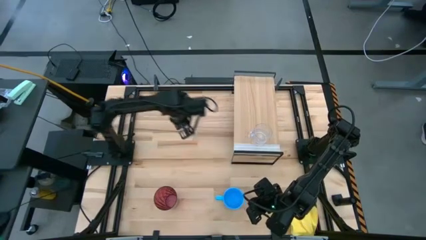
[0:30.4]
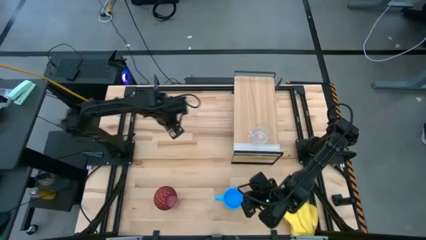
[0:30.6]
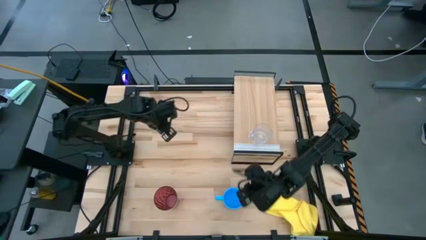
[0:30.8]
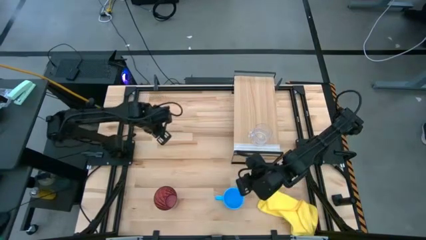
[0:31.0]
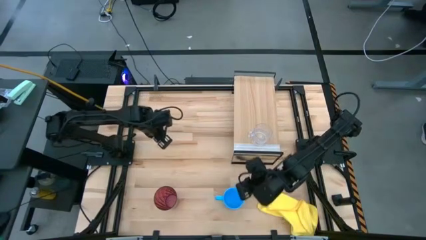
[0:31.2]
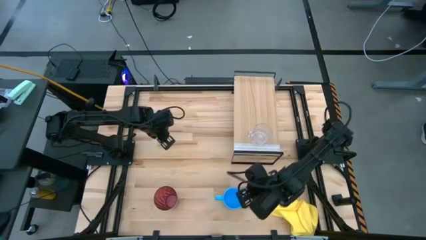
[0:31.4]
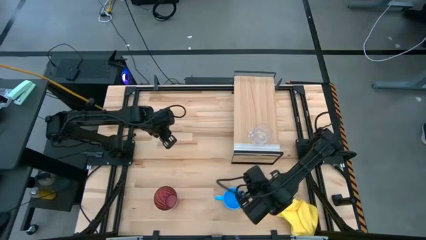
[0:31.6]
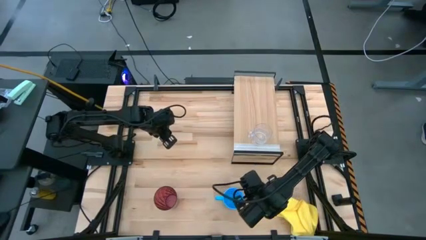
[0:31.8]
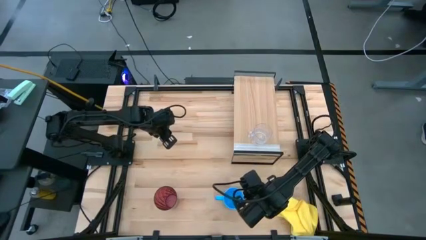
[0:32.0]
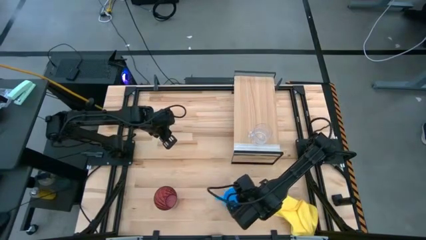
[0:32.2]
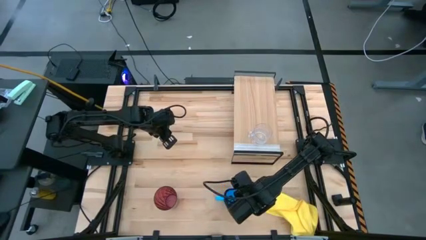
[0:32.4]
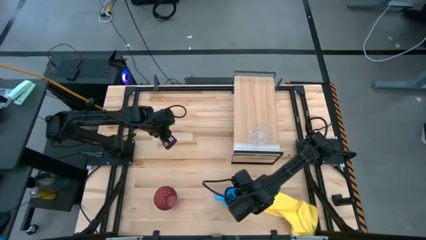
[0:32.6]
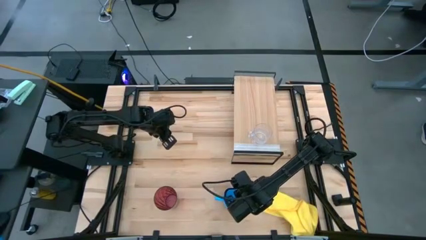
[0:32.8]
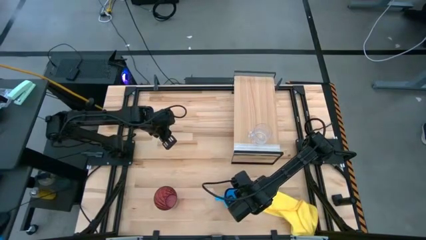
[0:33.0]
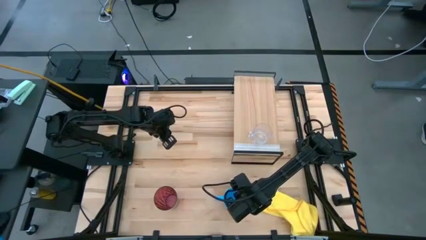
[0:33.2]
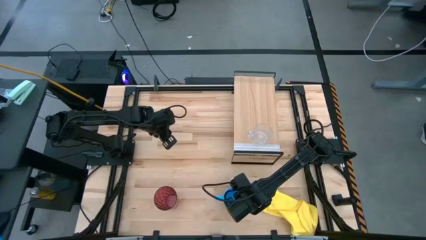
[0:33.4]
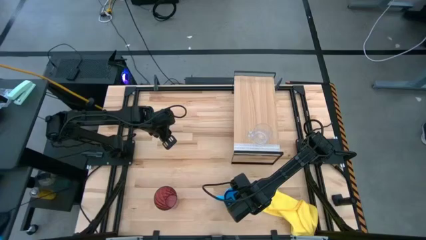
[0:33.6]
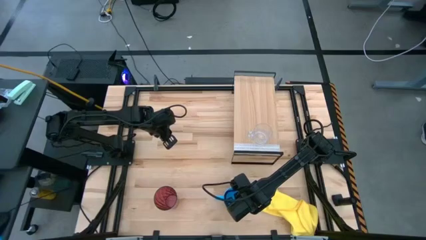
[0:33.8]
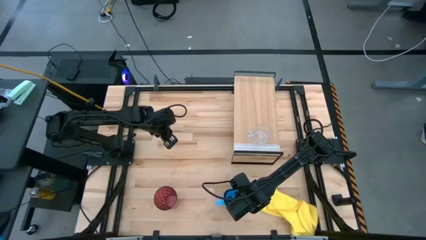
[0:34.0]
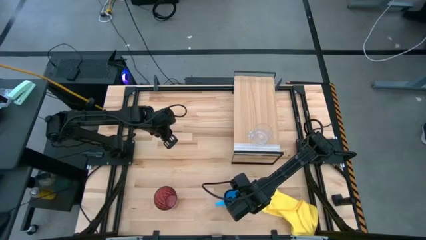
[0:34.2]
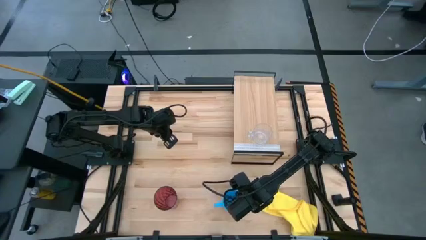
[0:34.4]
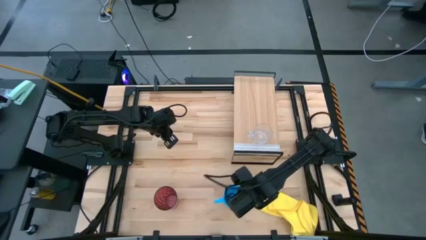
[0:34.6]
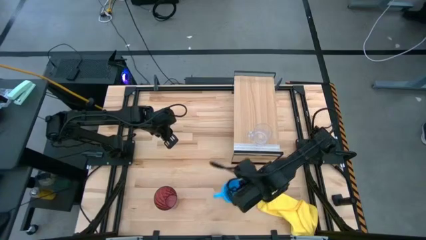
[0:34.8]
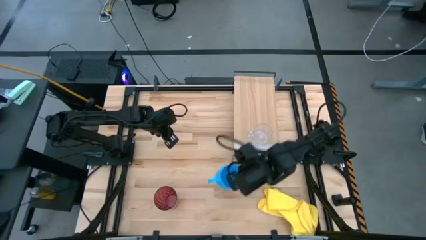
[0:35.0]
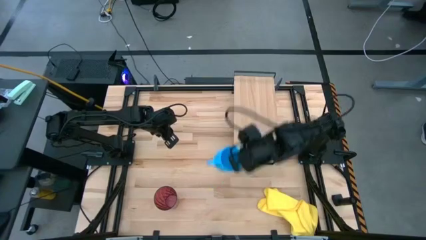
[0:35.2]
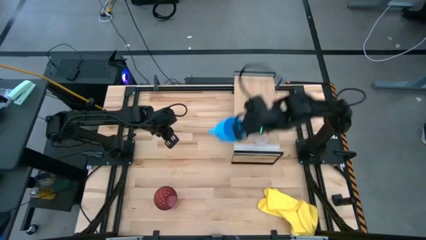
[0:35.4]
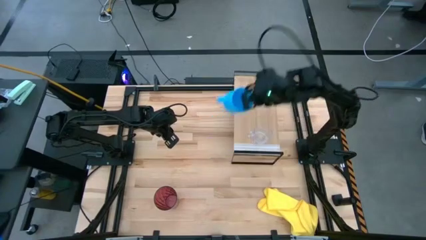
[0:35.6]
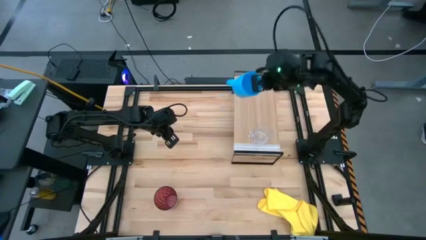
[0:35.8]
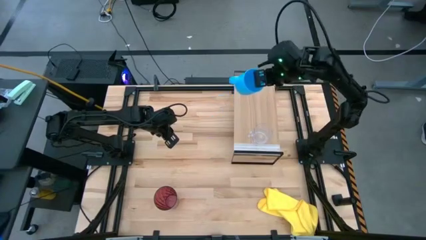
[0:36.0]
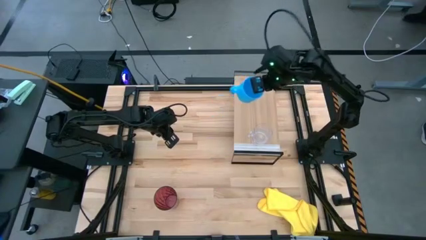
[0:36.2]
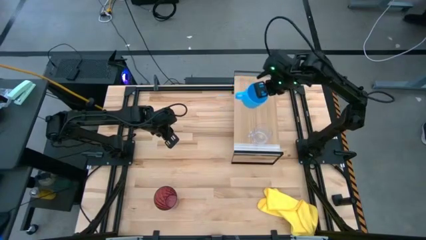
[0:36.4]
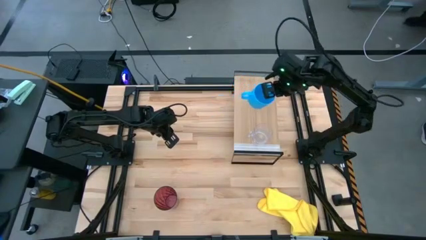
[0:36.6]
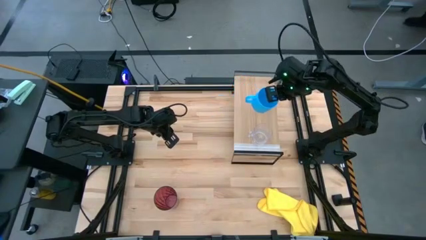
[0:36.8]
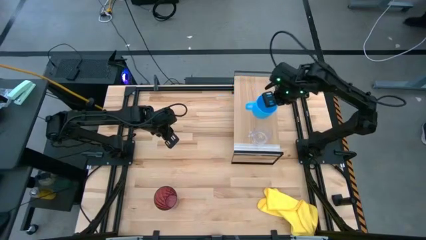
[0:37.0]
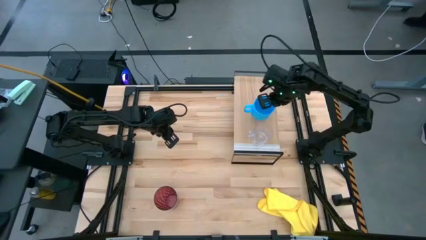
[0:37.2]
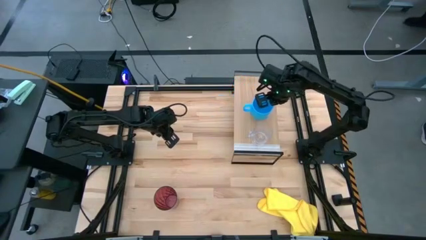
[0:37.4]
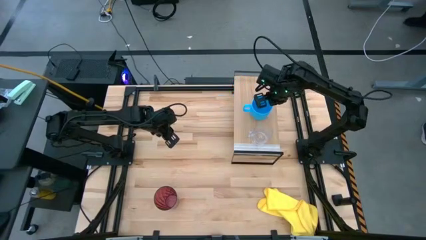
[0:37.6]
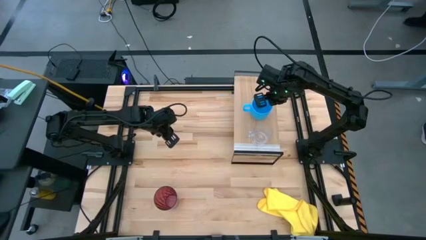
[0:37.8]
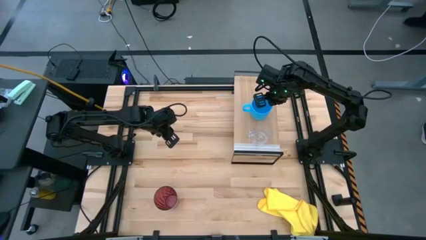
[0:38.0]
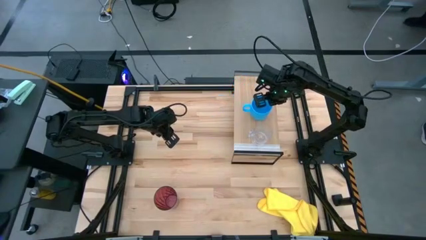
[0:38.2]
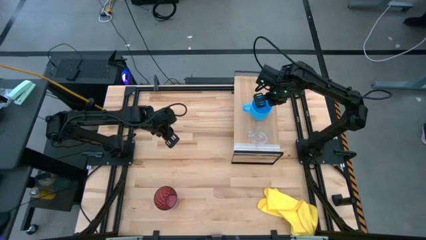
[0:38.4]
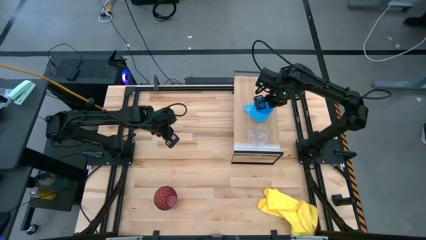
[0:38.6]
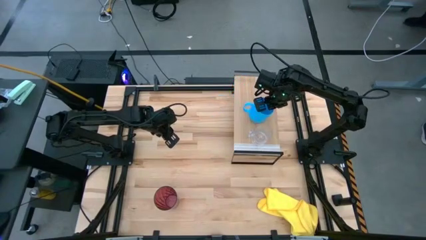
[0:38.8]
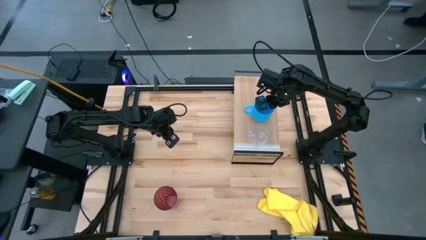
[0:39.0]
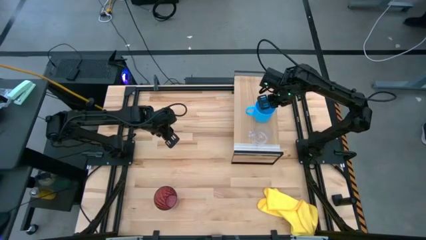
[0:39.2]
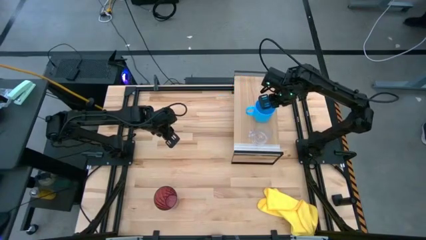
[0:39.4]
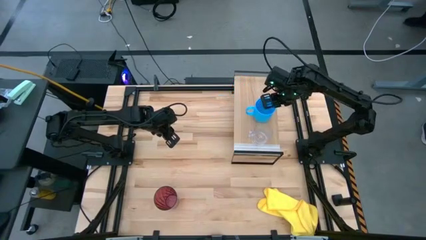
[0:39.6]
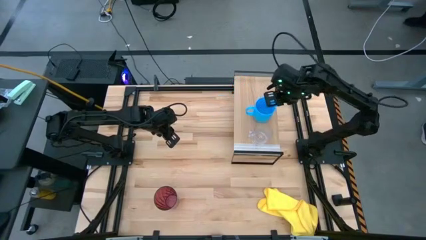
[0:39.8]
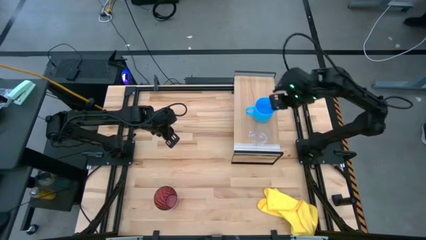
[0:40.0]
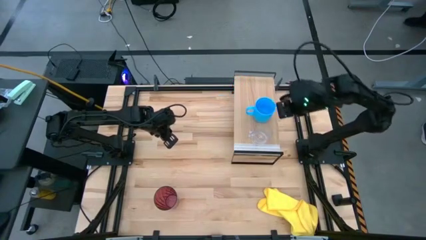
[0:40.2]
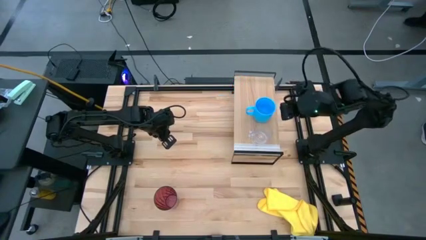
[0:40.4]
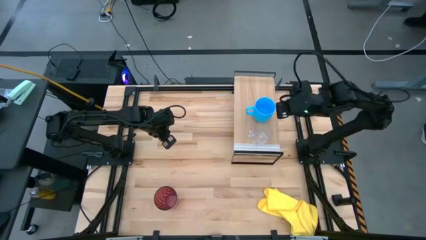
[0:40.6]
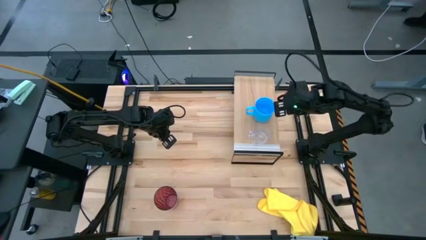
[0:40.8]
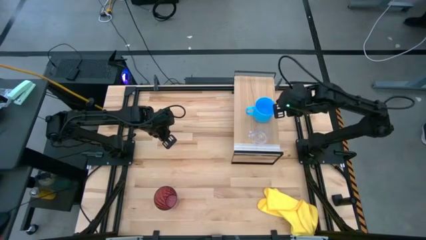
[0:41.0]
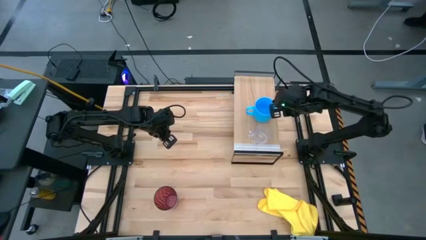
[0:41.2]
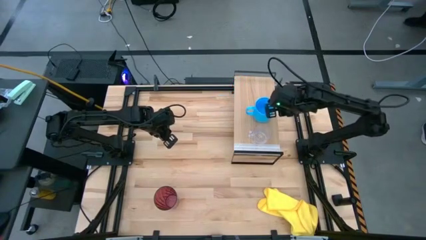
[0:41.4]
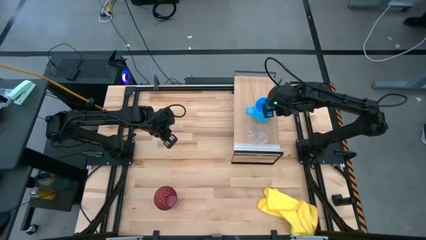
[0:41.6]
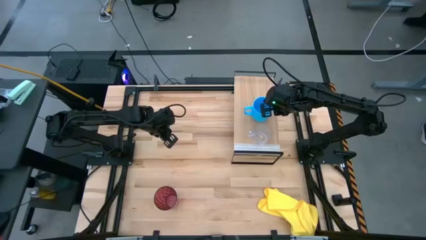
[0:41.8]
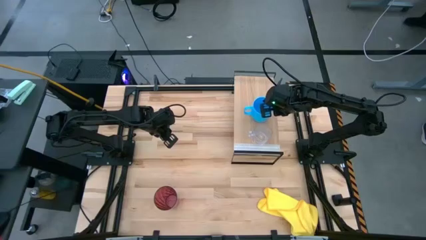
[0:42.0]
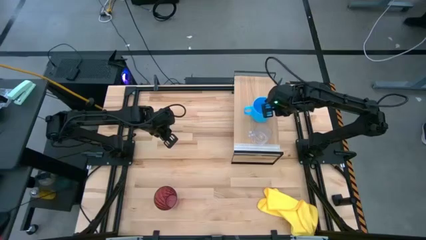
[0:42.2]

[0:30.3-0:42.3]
Task: Stack small to large cups/mugs on shelf
Put the blue cup on the shelf
